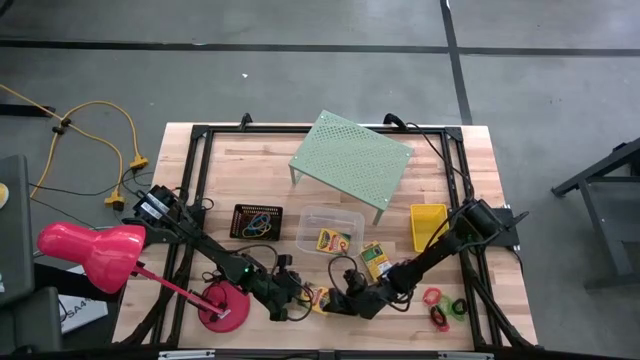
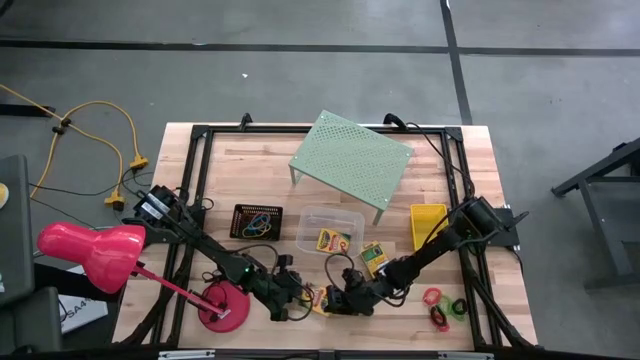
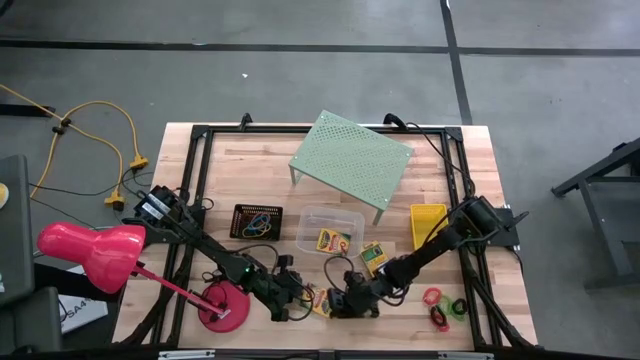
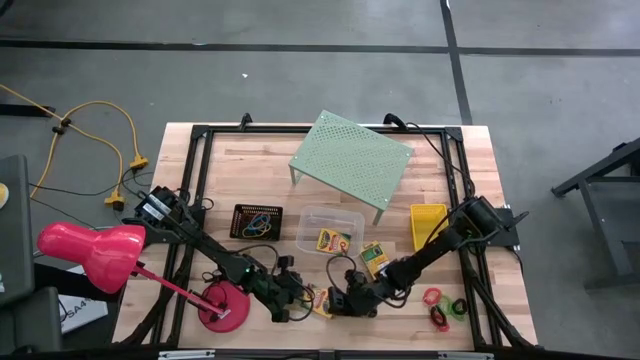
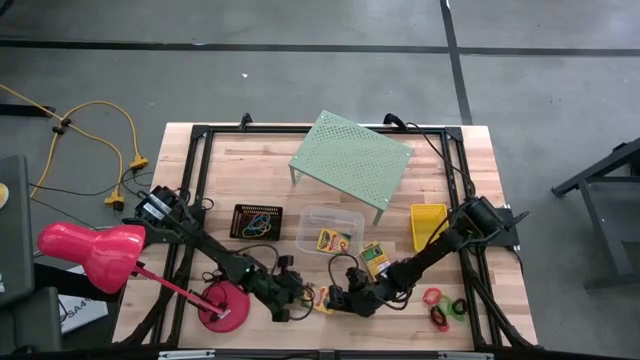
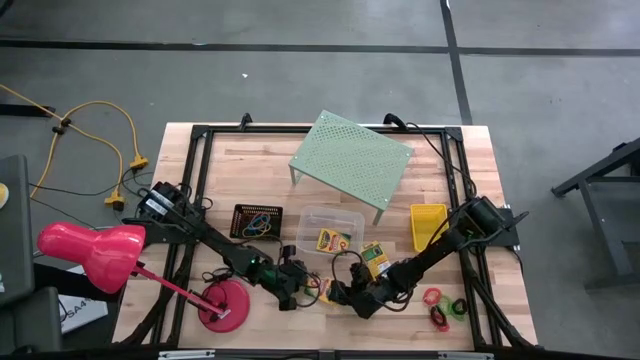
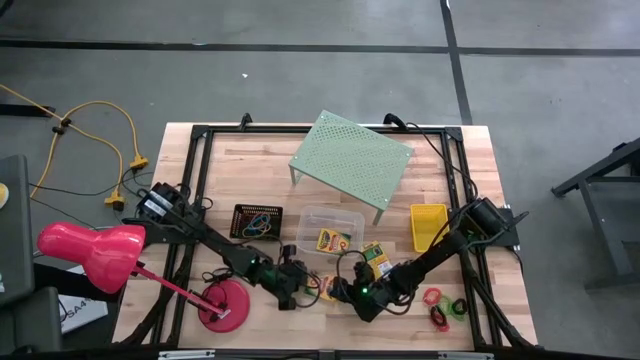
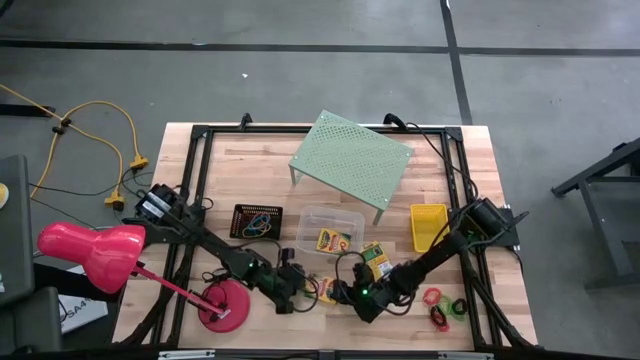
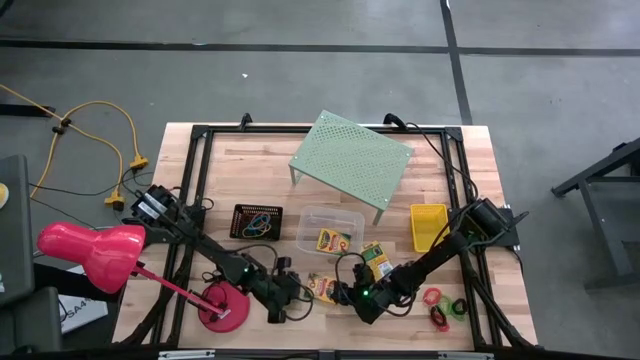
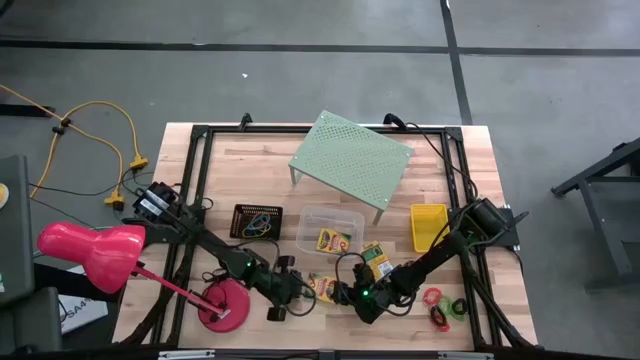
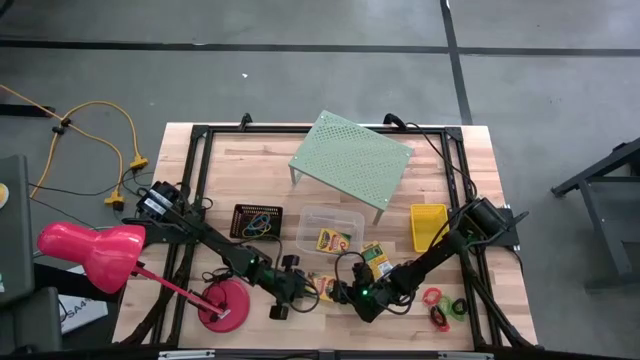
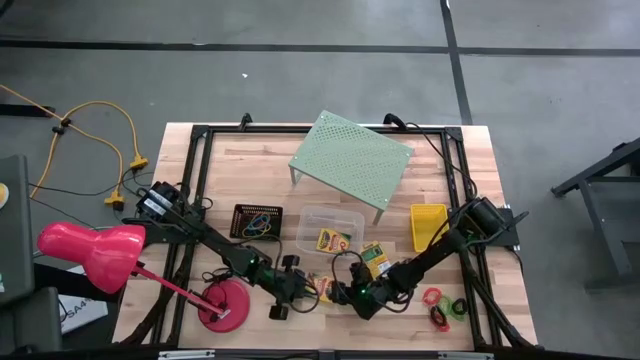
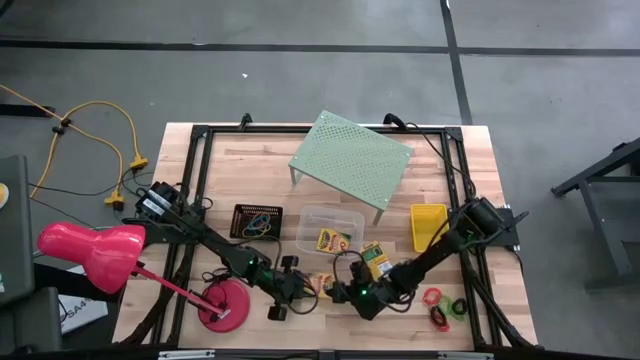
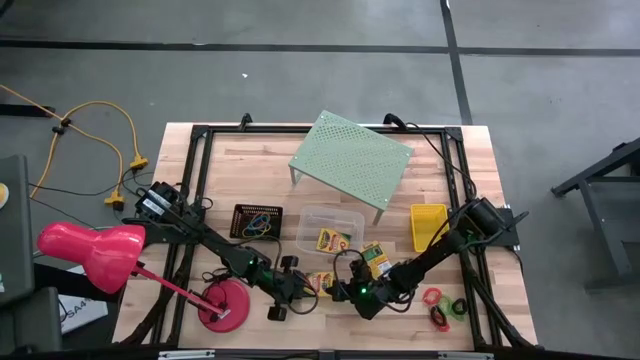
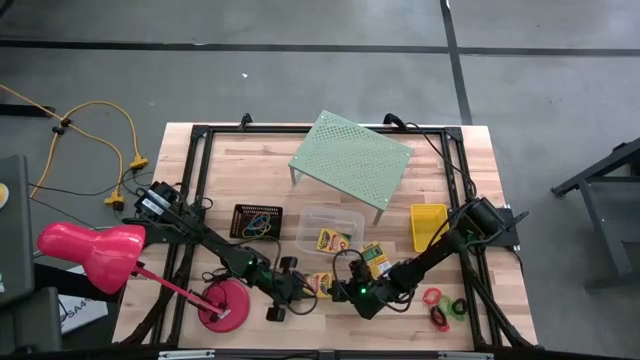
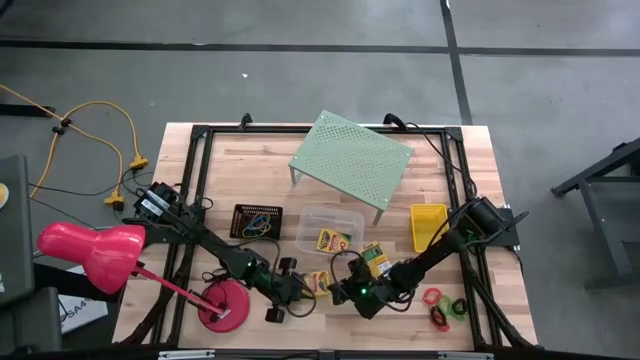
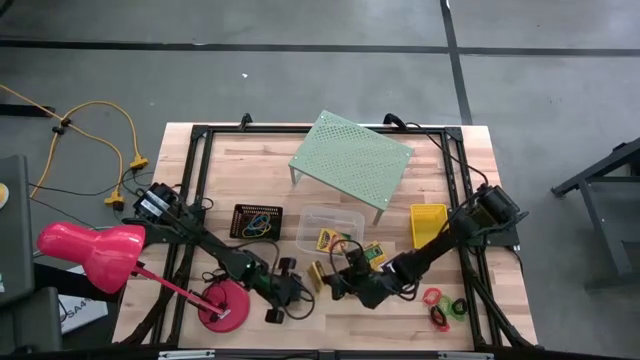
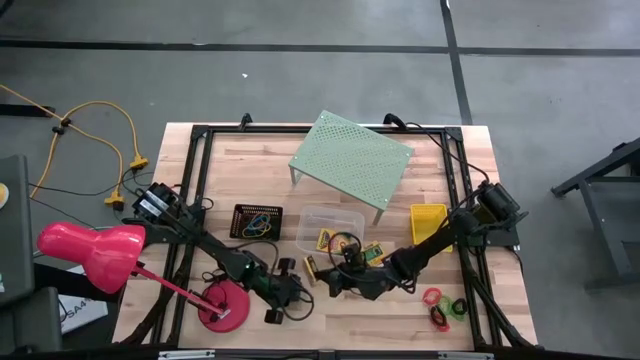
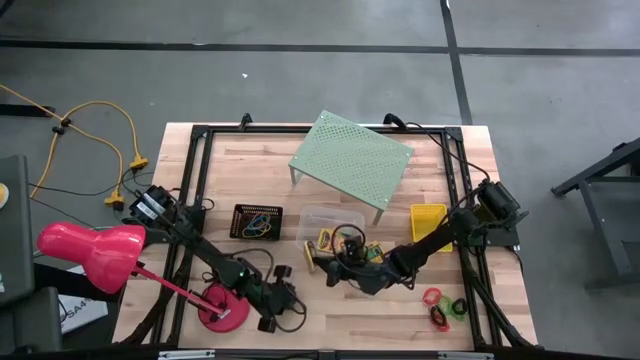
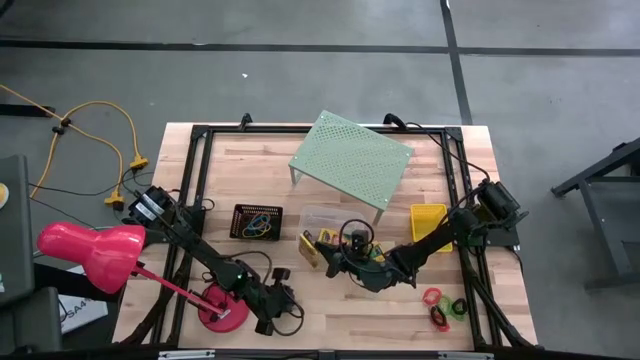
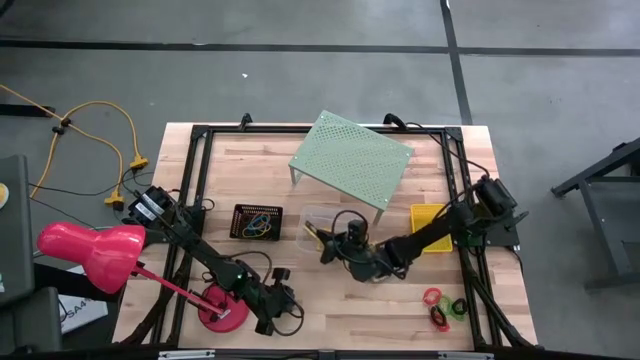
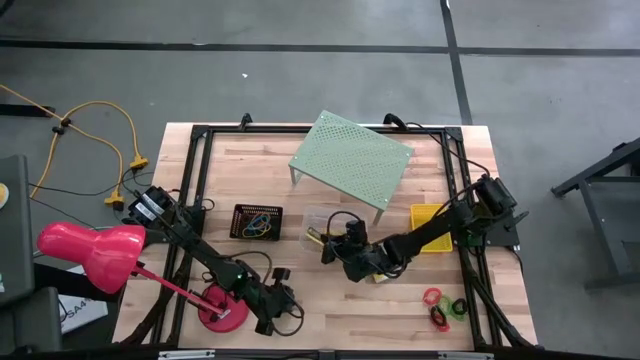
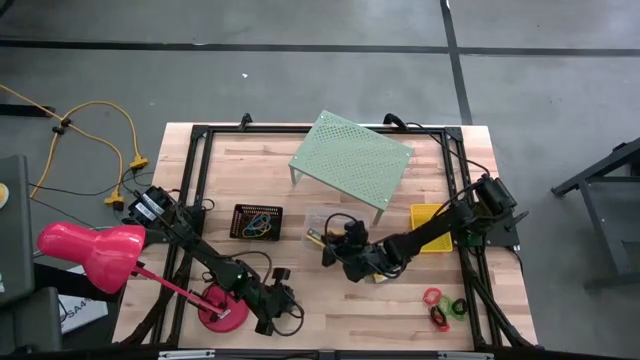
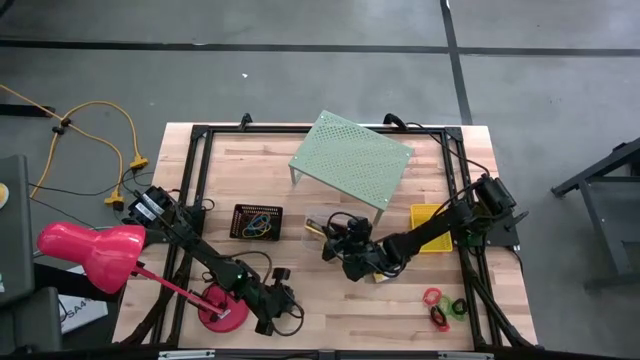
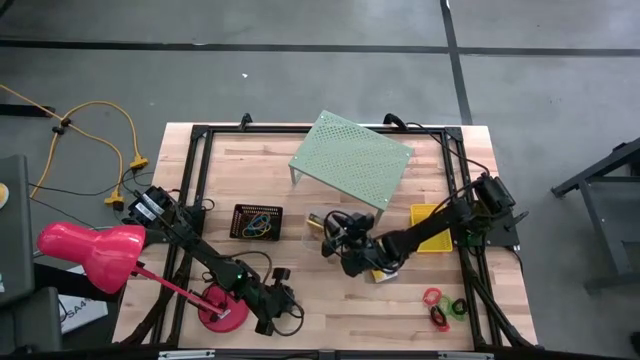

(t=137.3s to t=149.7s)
Task: Pick & Place Office Desk Supplies
Put the left yellow crayon box into the transparent bin

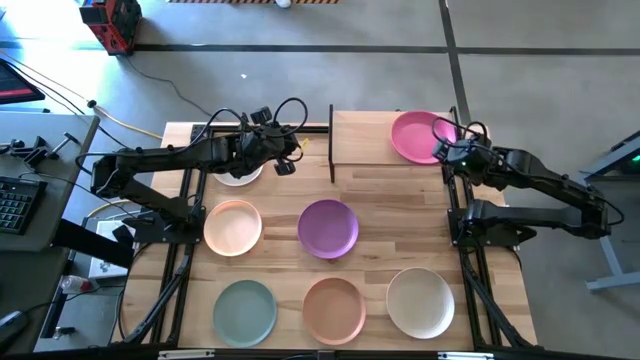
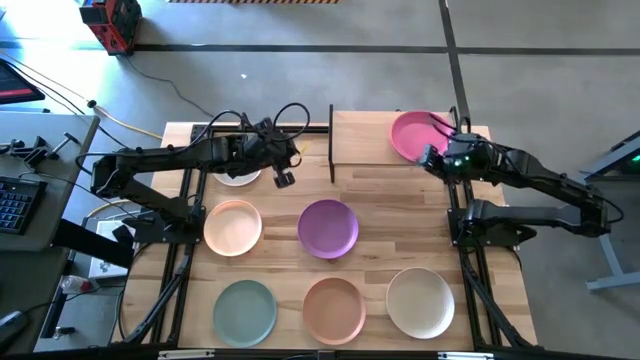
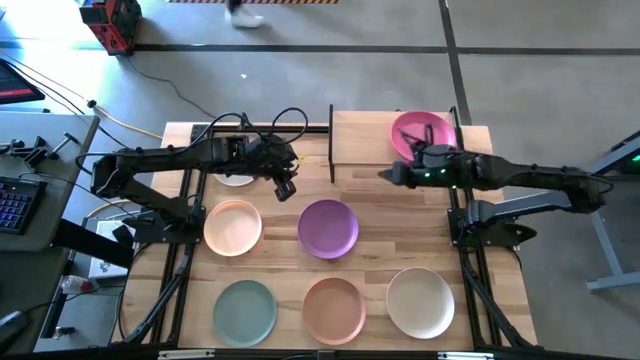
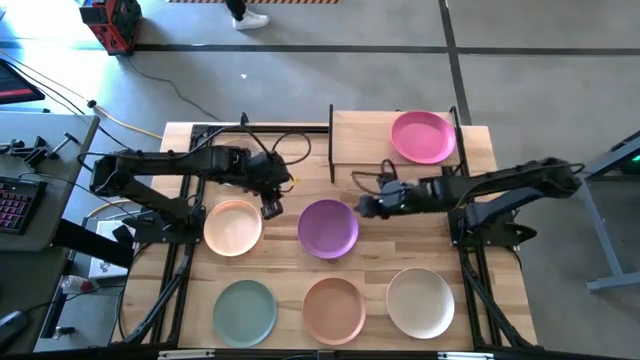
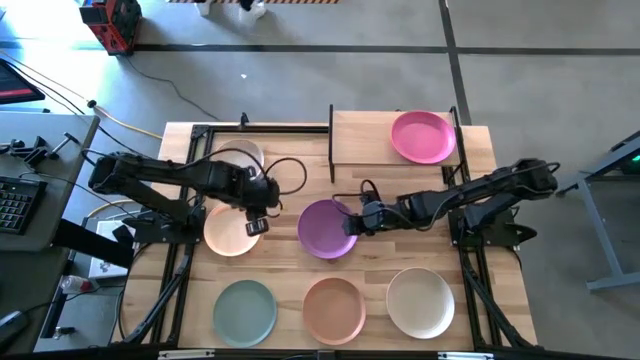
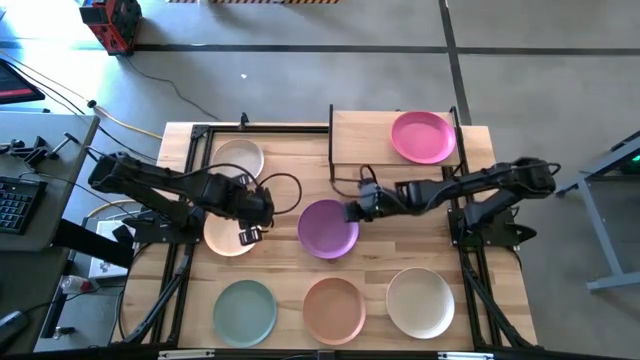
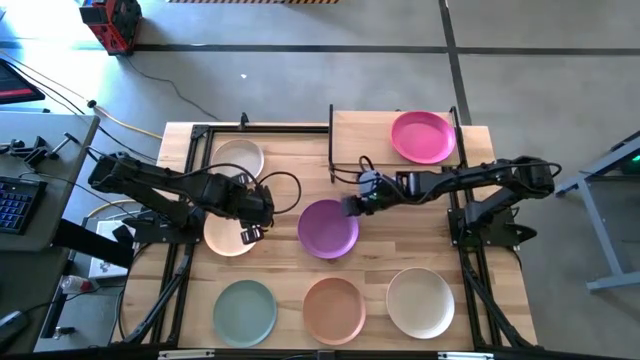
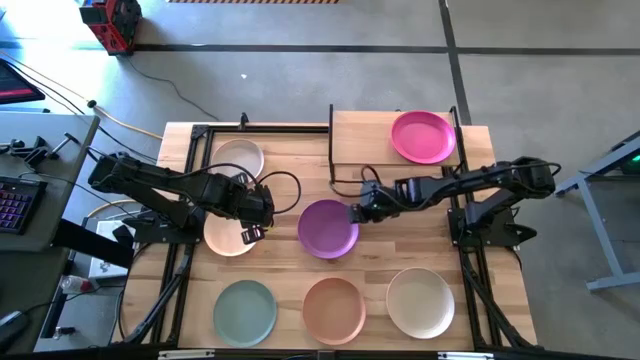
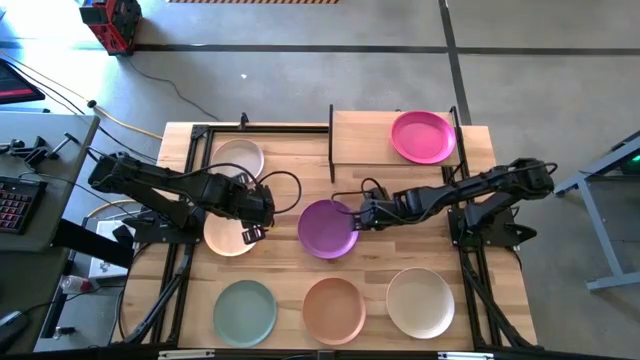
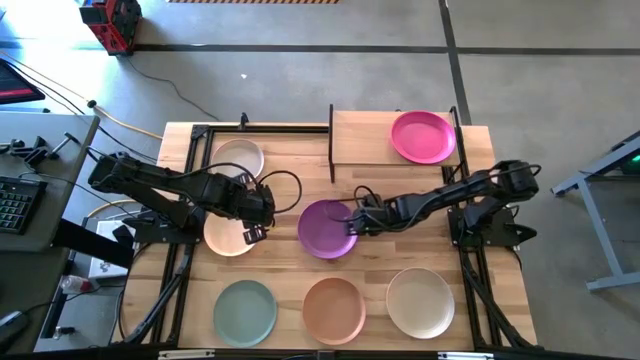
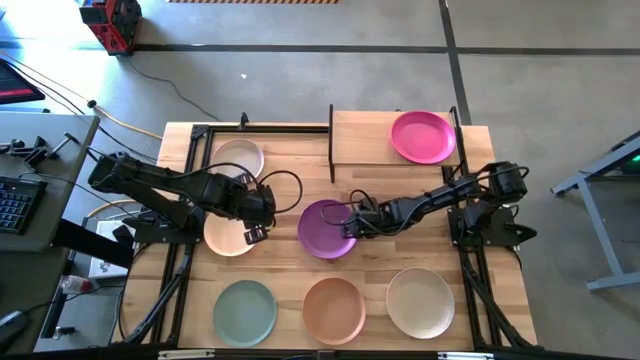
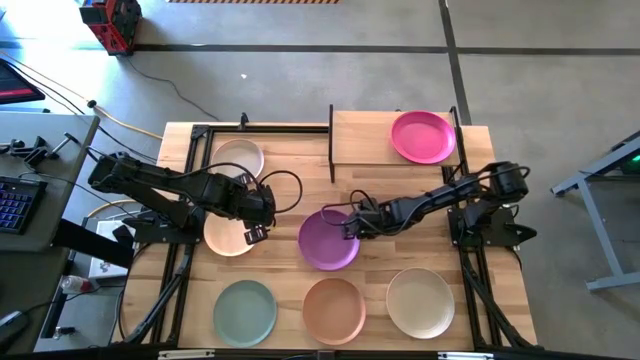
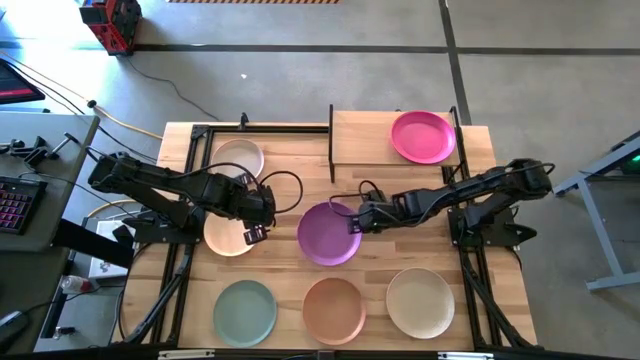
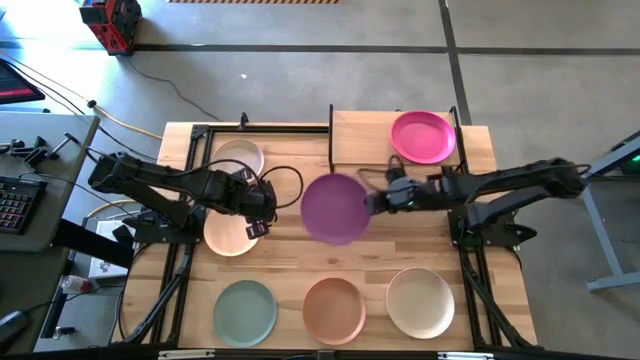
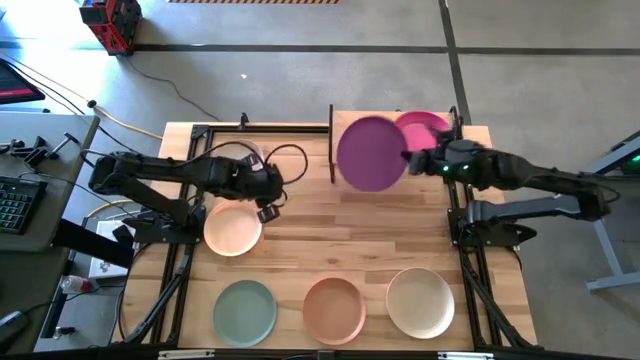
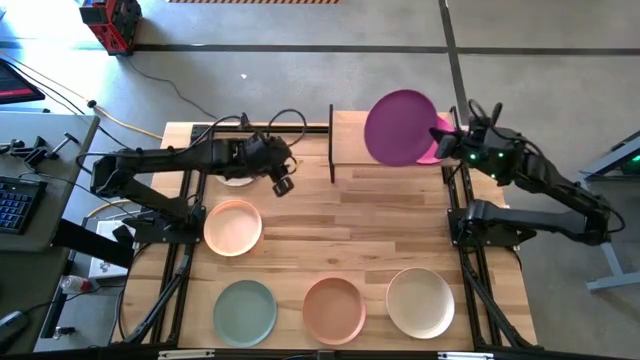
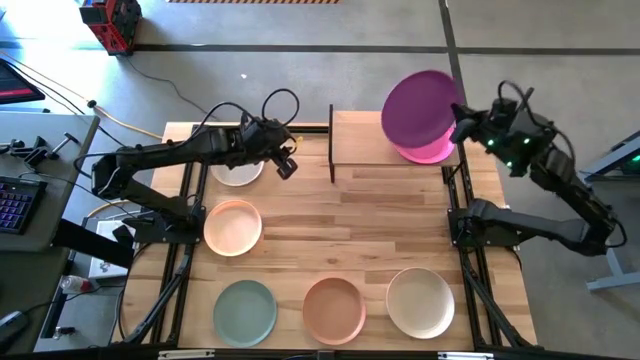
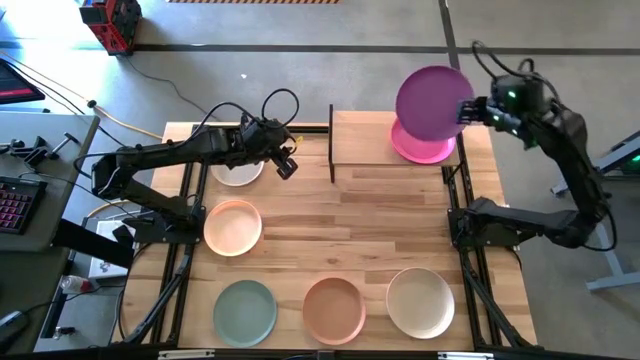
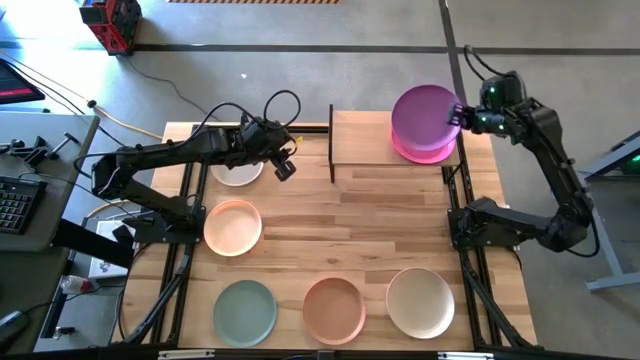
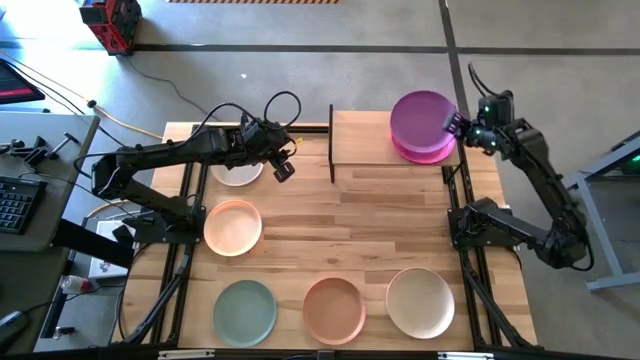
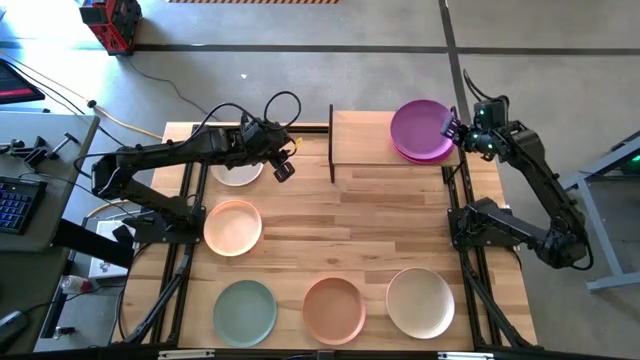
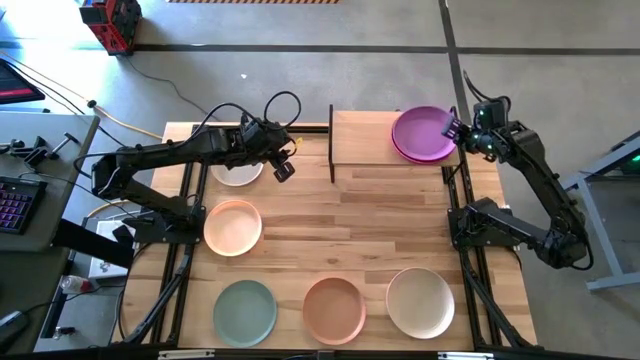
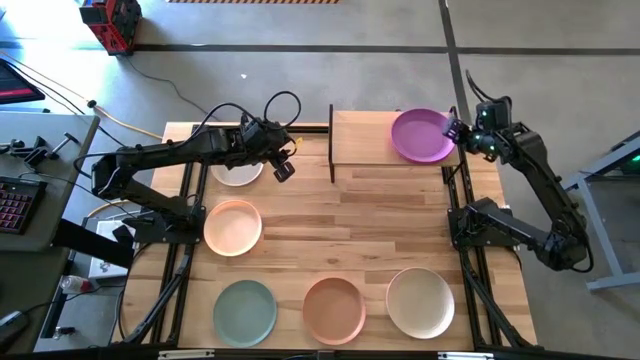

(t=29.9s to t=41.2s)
Task: Place and stack plates onto a shelf
Stack the purple plate on top of the pink plate on the shelf
